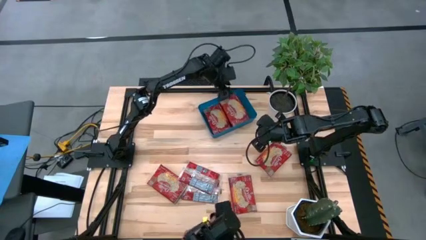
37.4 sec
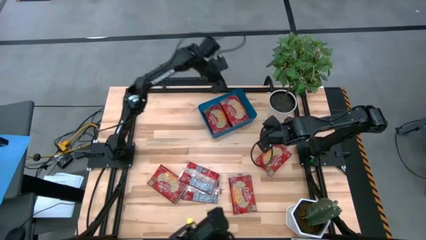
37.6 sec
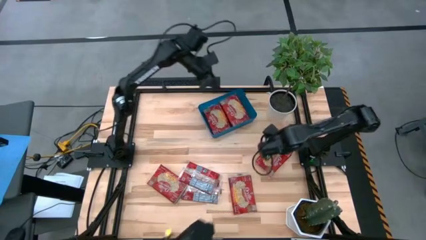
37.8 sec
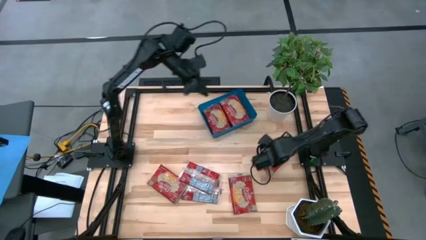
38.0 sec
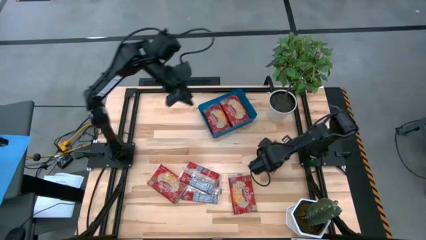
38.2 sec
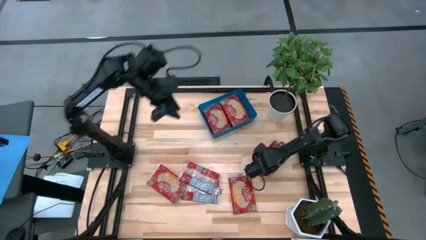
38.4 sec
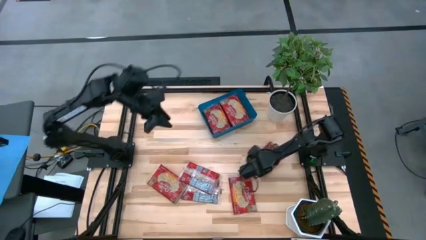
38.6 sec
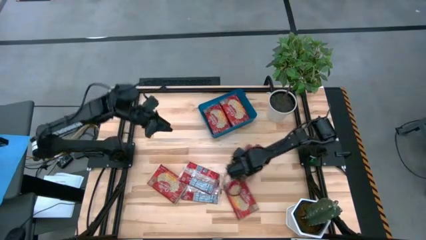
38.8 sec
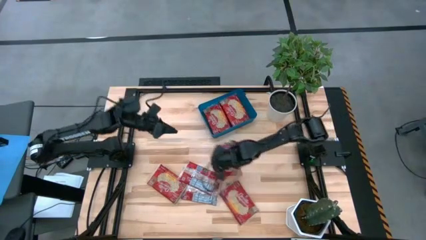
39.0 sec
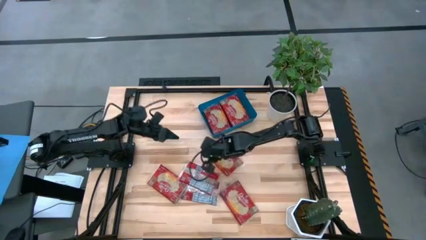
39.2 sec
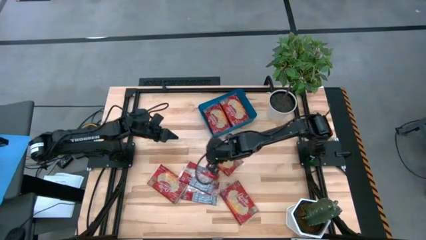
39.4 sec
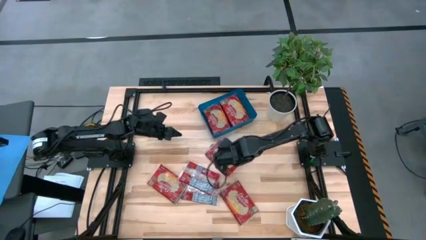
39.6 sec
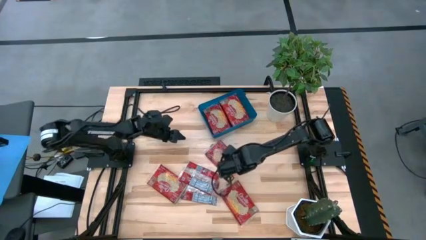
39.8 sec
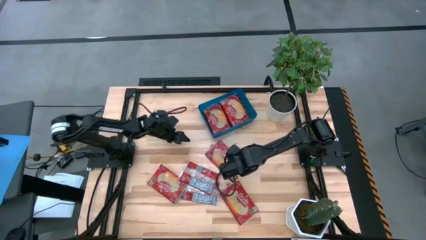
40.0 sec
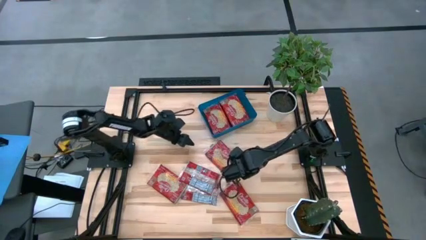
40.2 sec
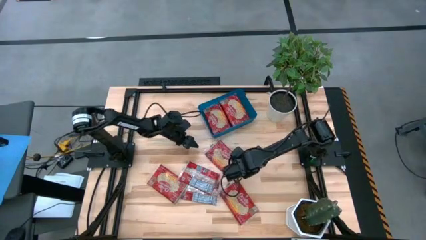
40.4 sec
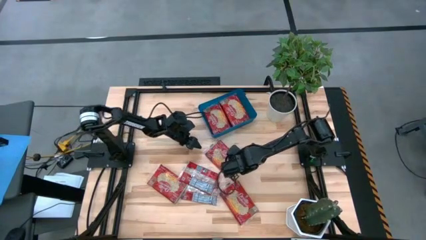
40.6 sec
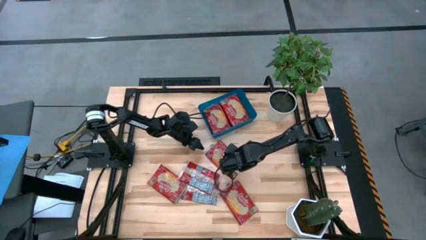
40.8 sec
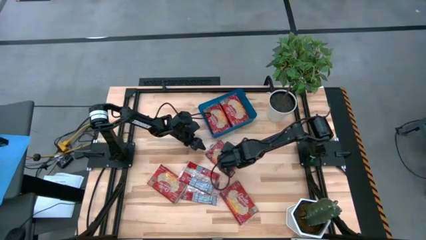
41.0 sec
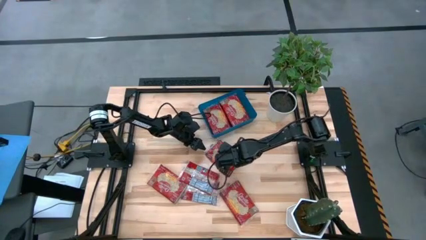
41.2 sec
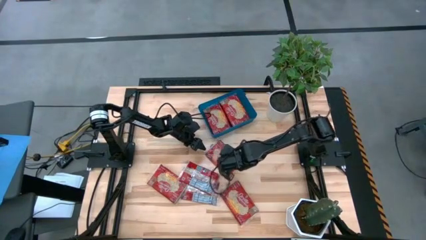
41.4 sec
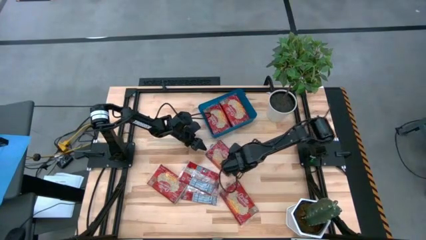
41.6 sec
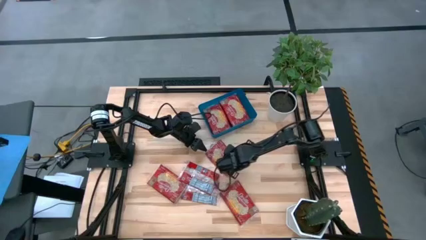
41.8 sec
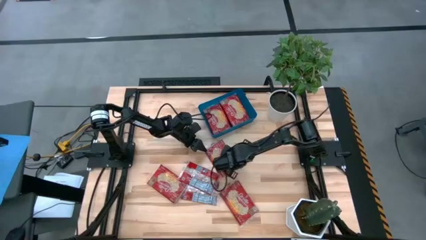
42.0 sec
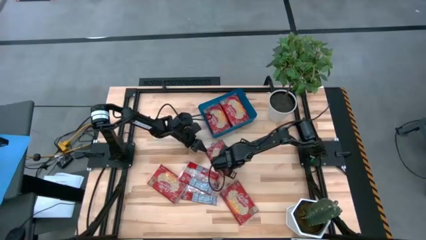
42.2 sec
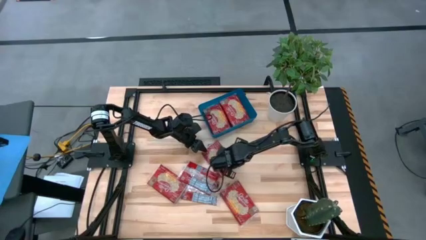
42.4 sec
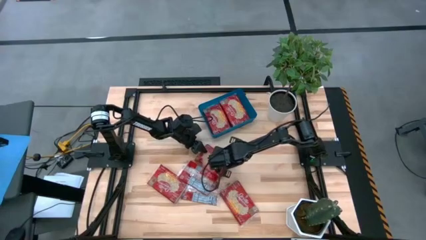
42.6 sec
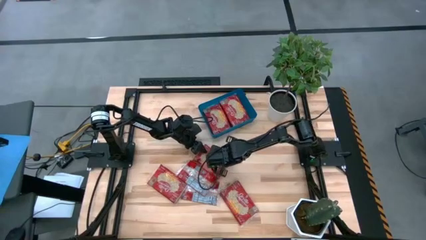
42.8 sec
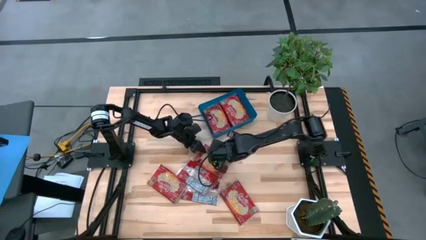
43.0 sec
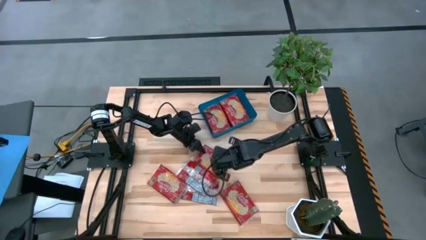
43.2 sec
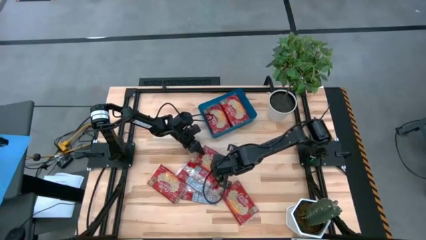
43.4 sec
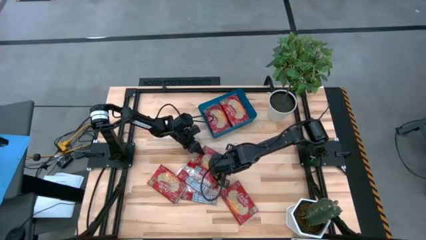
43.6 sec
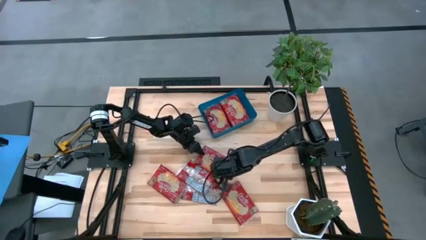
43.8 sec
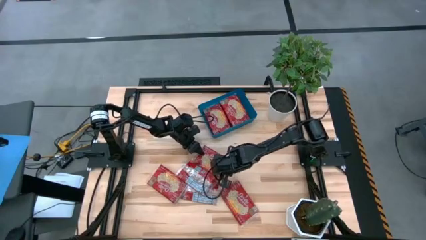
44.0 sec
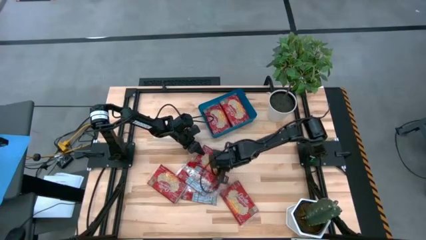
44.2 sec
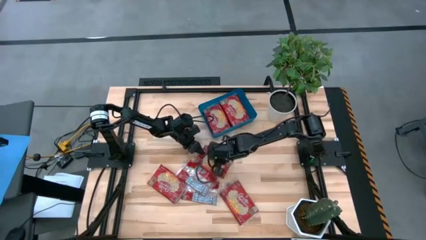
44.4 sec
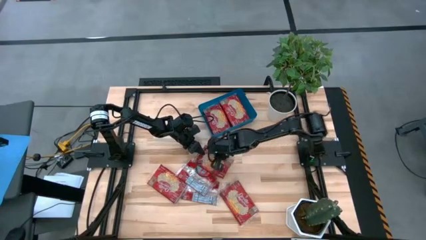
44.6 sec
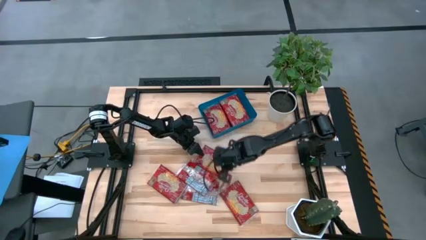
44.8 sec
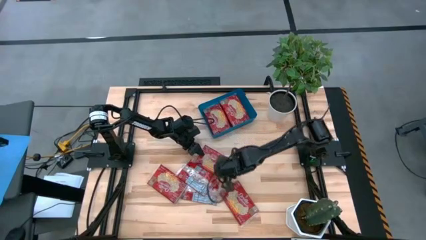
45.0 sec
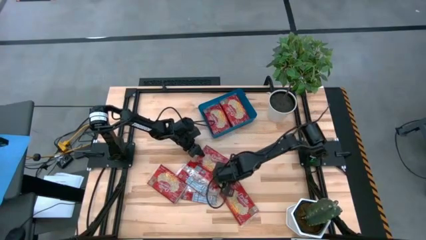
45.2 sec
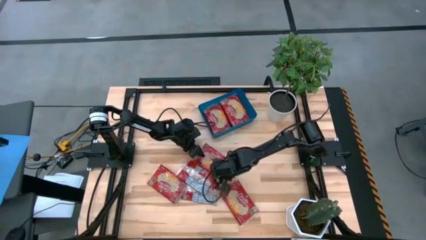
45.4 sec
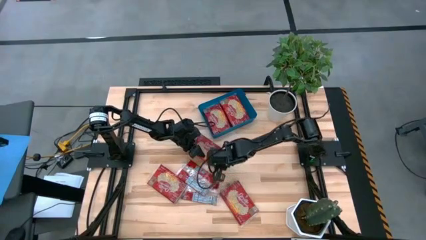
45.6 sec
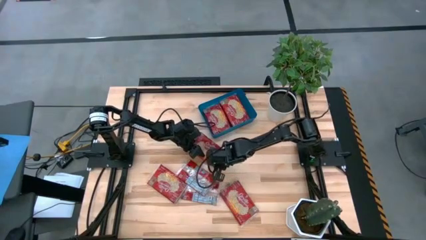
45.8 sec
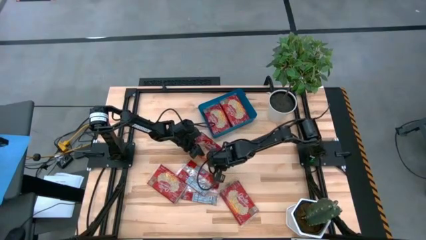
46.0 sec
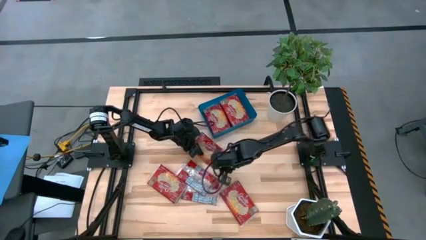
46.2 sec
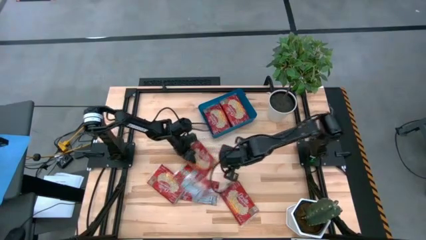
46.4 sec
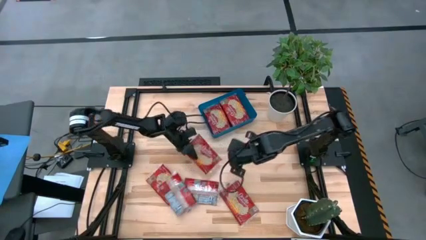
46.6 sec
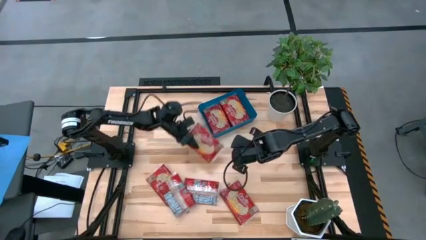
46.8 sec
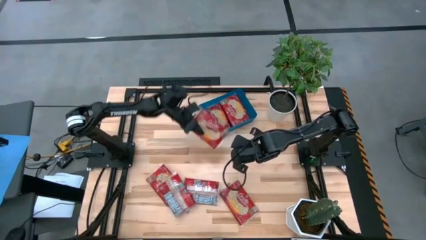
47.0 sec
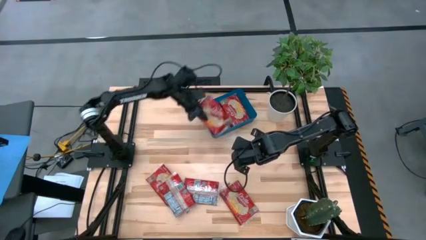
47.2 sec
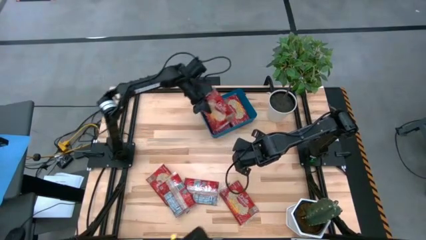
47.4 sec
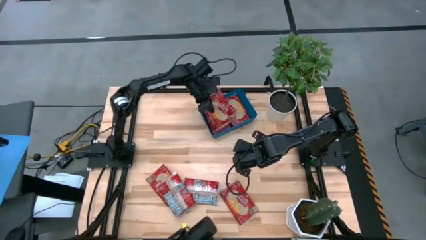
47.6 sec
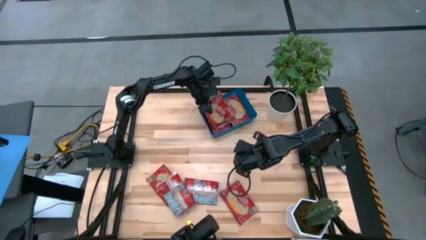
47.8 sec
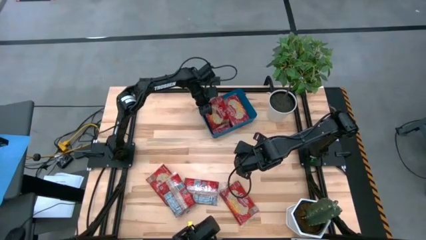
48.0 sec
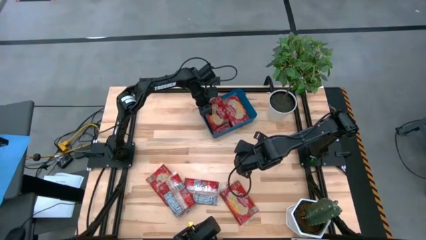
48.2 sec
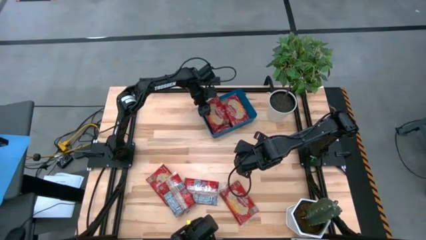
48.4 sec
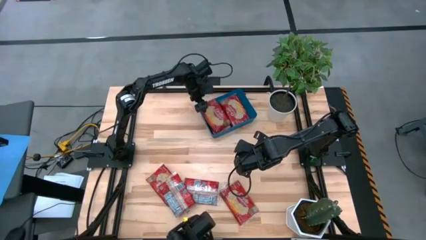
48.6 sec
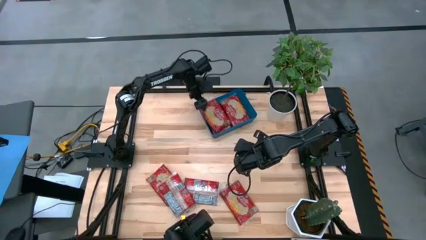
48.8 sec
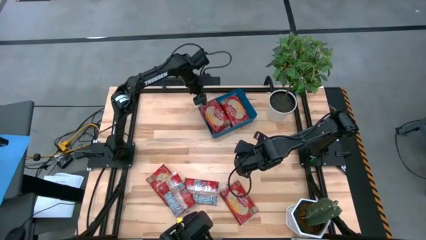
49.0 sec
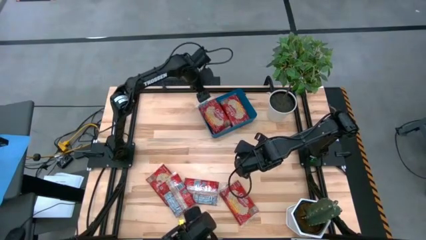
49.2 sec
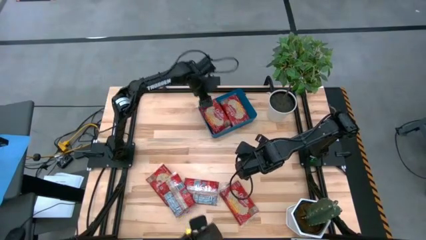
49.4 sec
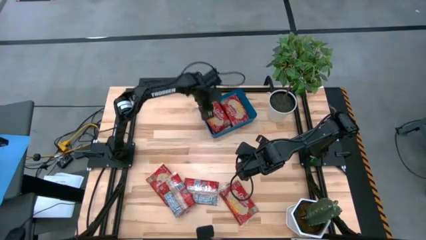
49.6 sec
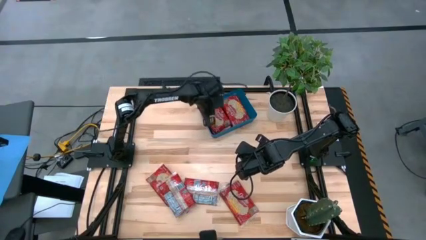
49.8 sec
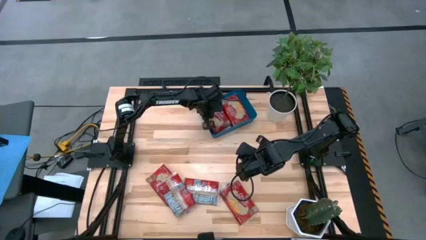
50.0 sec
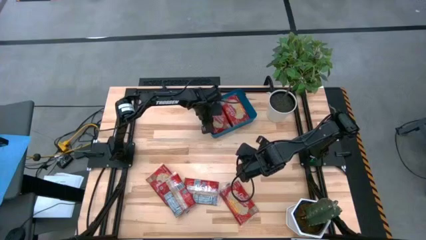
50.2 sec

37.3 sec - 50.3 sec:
Task: Sort popcorn bags into baskets
Put the red popcorn bag into the blue bin

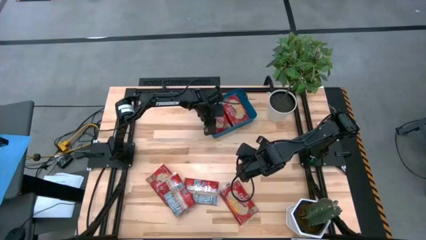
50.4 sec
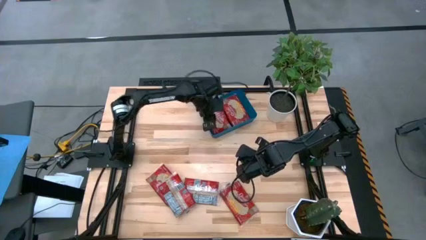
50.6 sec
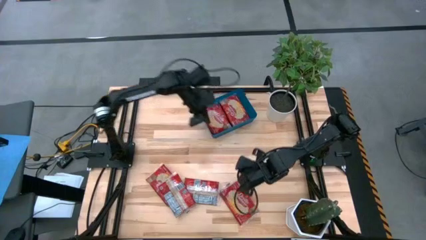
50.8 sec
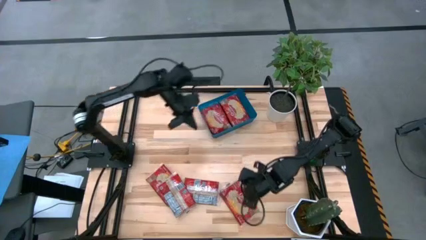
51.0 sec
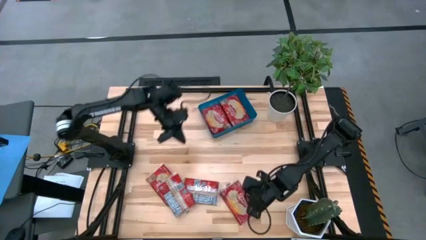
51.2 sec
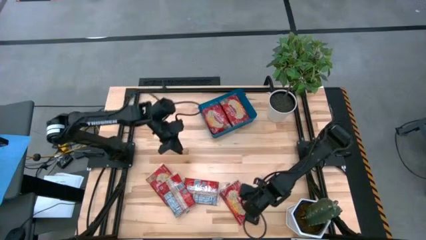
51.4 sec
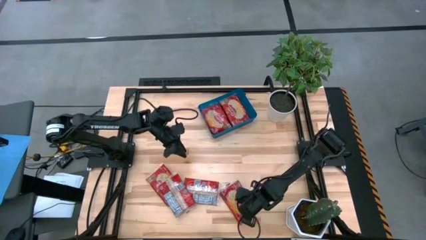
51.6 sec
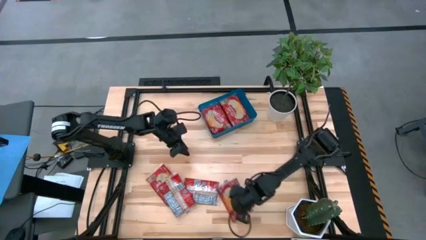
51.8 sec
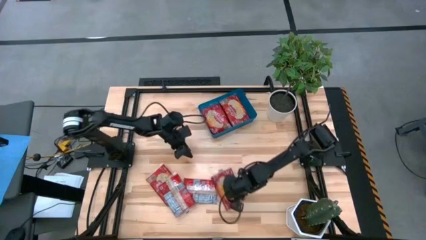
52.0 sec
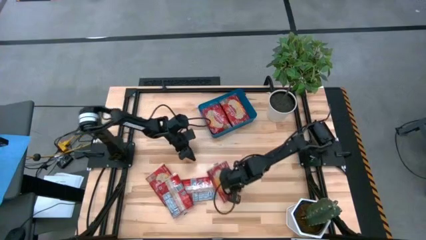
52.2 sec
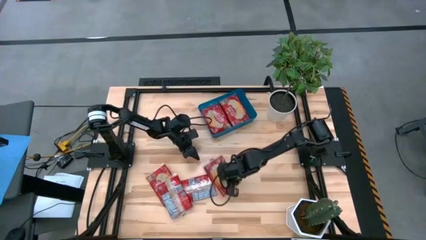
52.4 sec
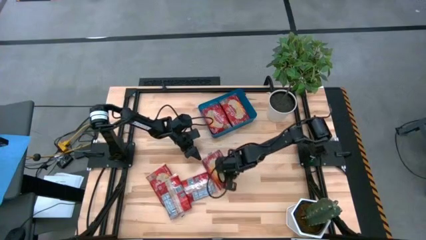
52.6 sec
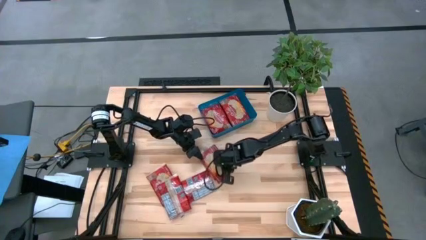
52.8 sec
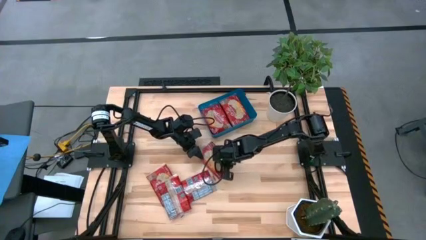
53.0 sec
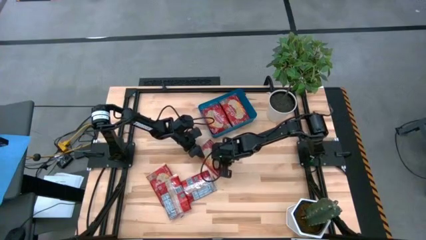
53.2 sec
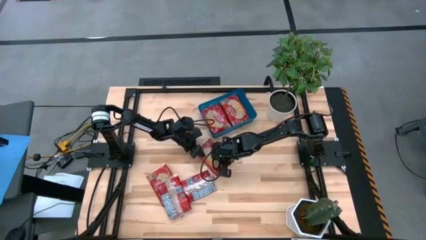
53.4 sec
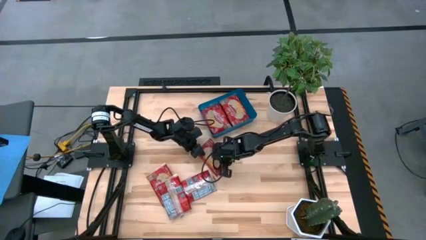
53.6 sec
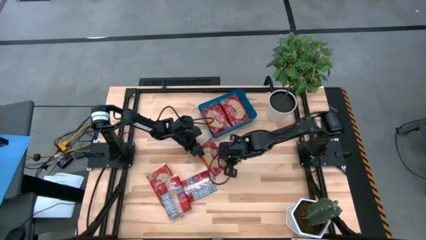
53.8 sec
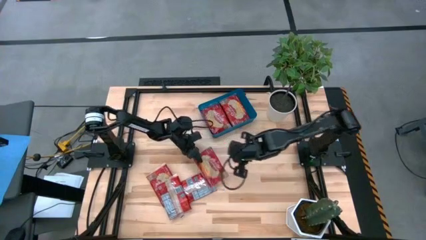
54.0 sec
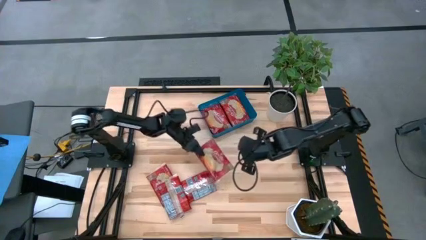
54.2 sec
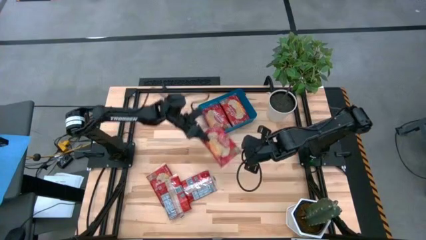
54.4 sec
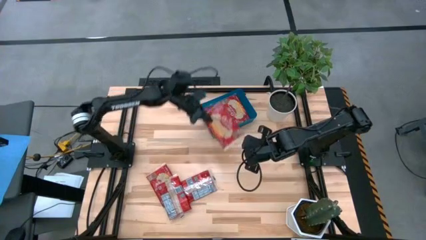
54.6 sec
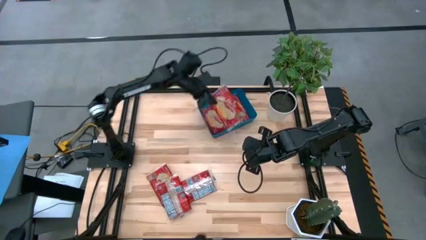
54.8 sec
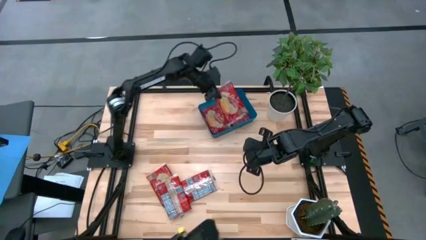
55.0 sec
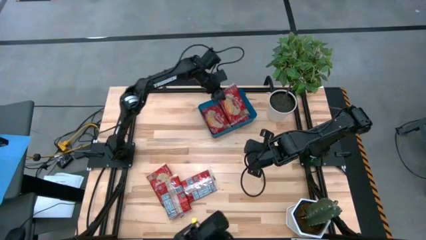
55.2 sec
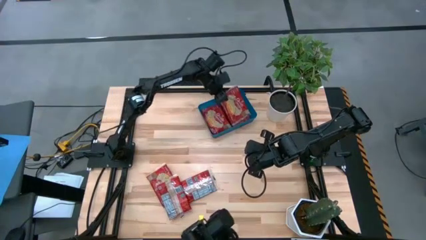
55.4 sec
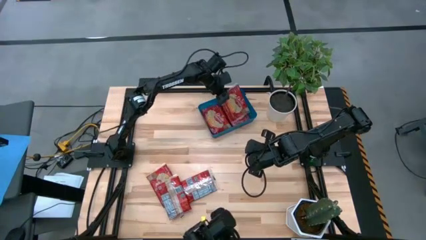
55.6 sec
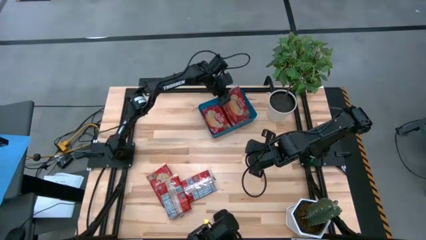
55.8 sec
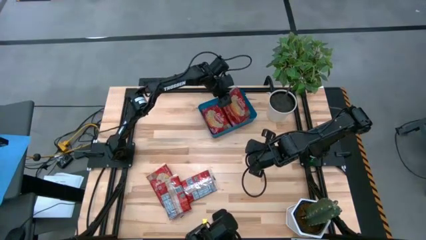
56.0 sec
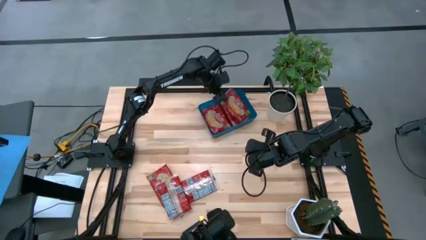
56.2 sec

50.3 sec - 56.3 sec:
Put the red popcorn bag into the blue bin
